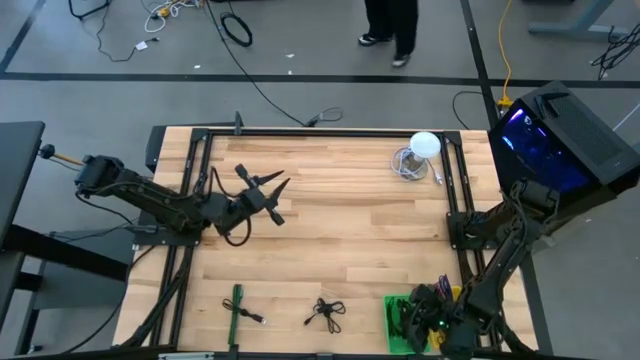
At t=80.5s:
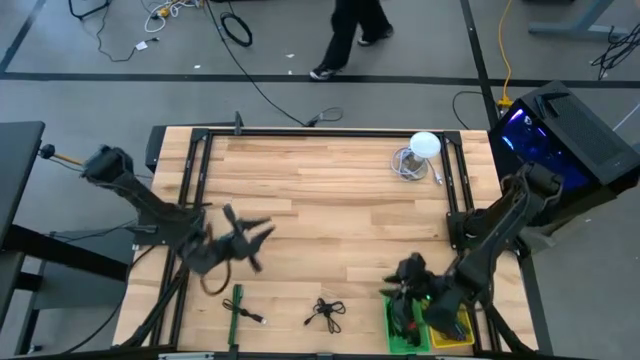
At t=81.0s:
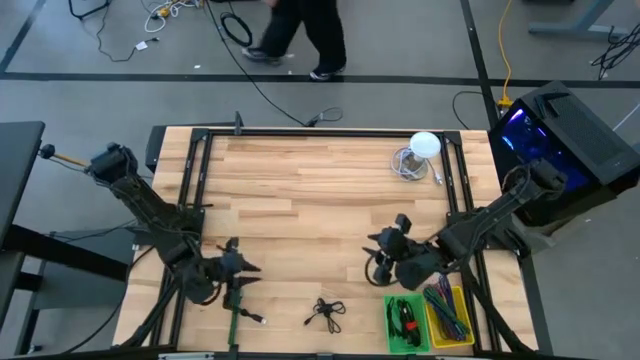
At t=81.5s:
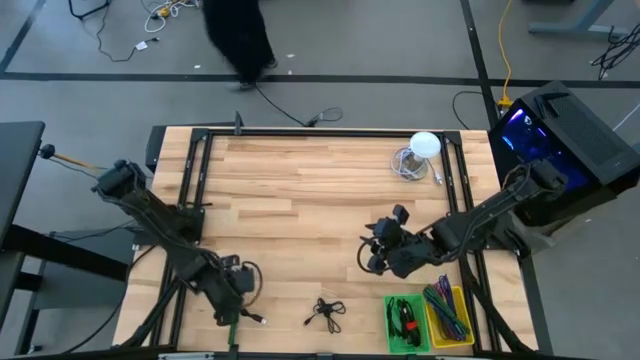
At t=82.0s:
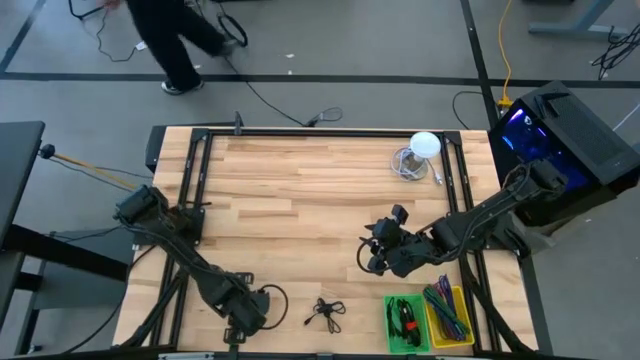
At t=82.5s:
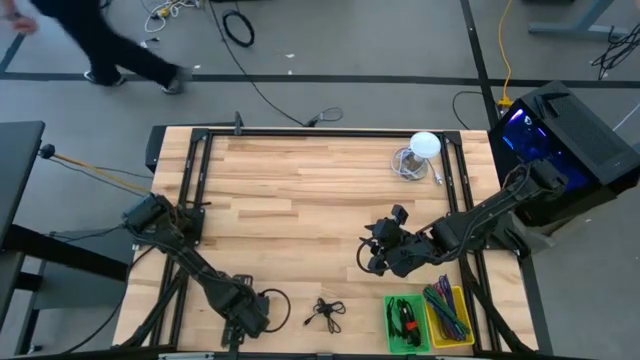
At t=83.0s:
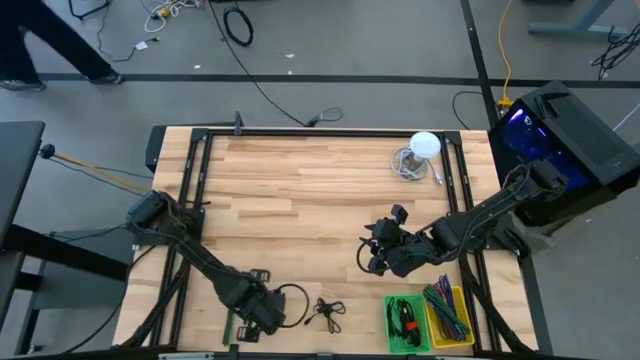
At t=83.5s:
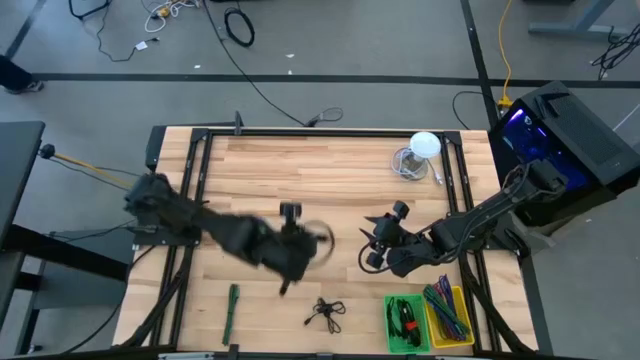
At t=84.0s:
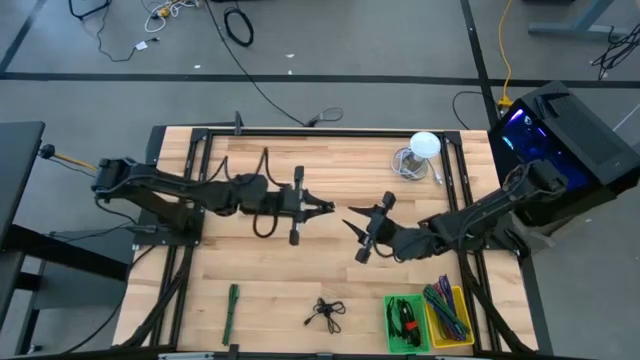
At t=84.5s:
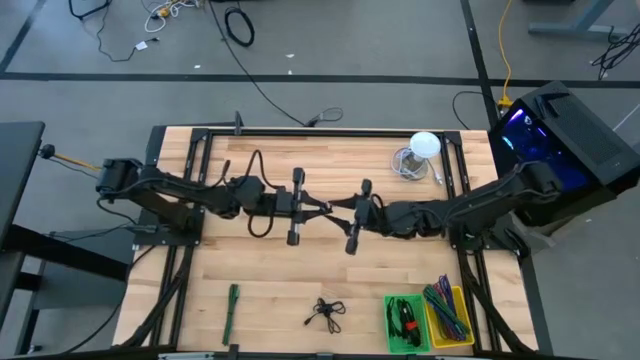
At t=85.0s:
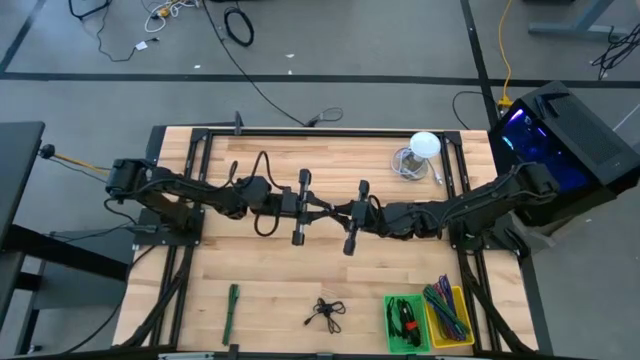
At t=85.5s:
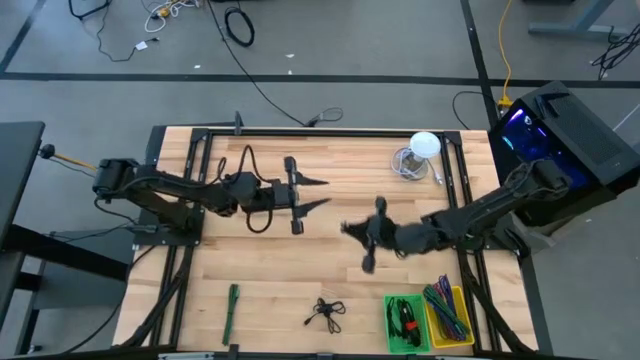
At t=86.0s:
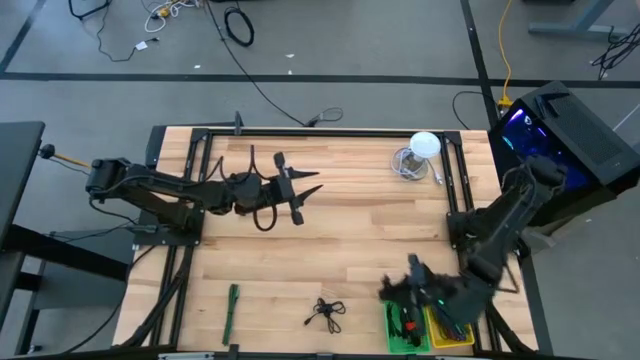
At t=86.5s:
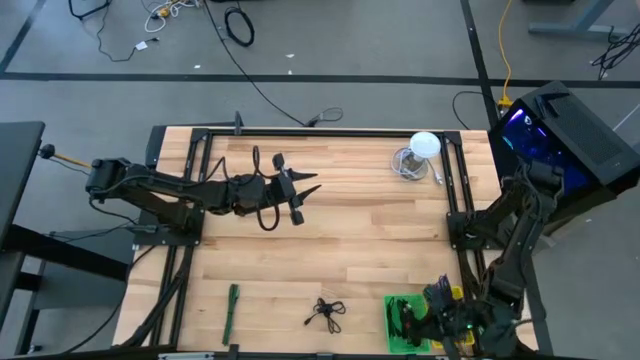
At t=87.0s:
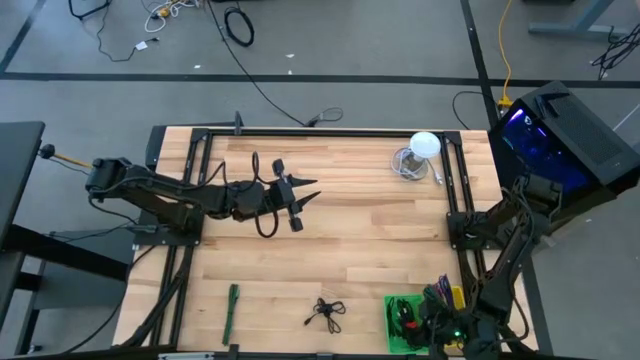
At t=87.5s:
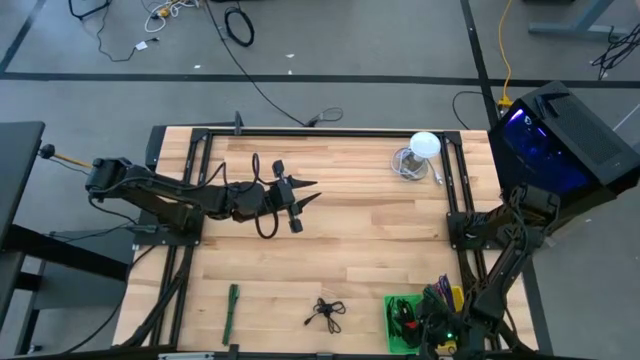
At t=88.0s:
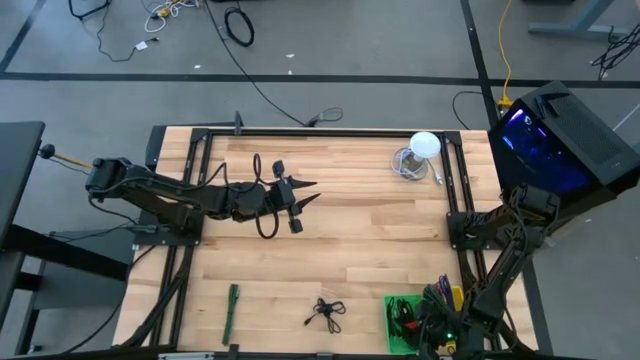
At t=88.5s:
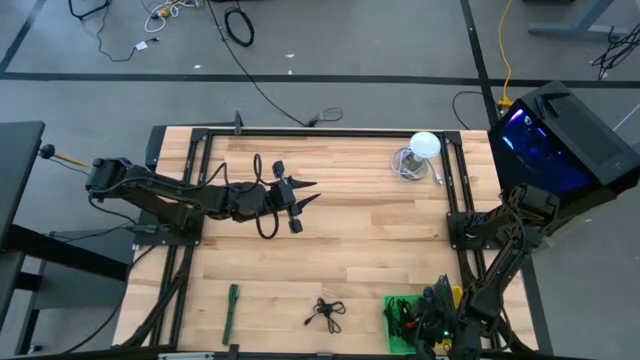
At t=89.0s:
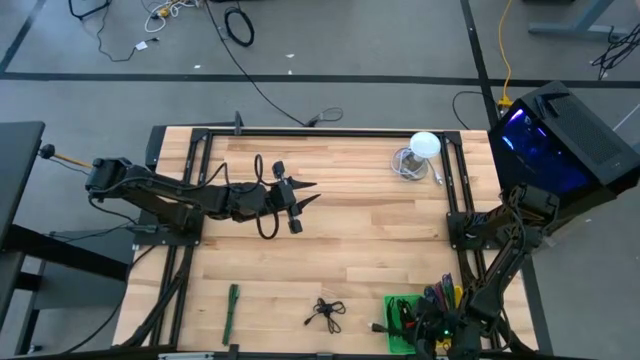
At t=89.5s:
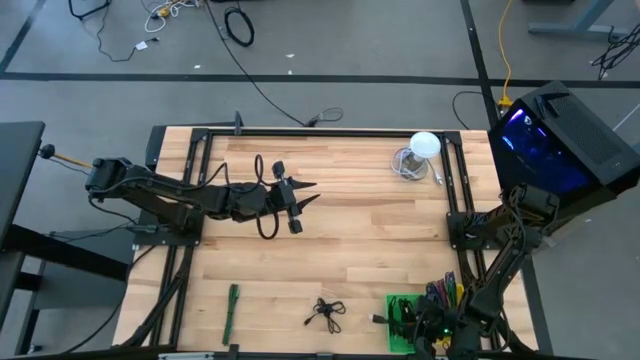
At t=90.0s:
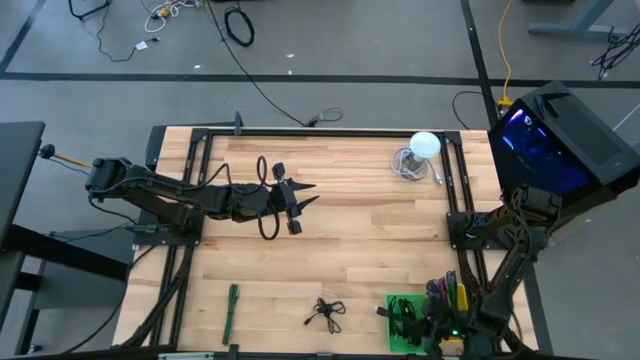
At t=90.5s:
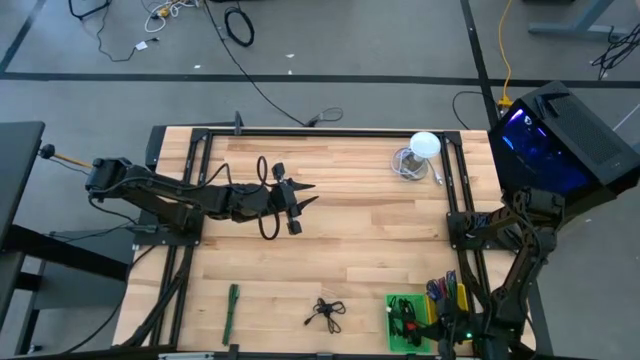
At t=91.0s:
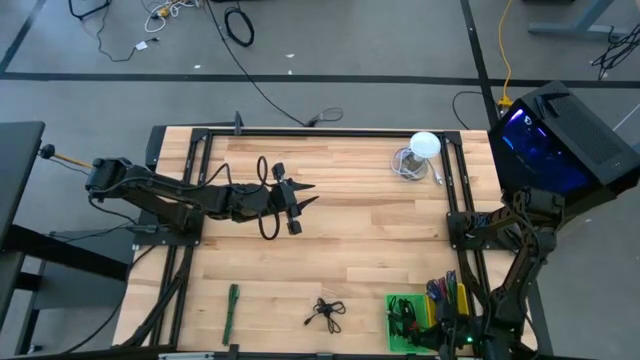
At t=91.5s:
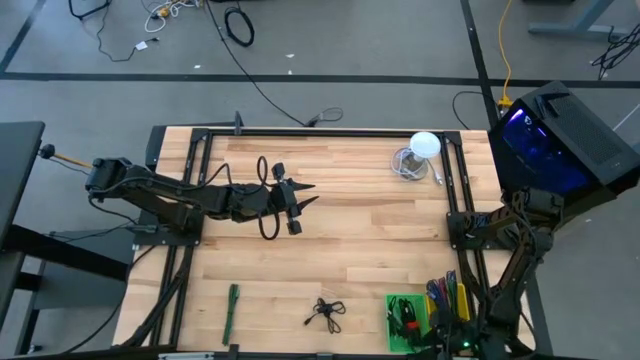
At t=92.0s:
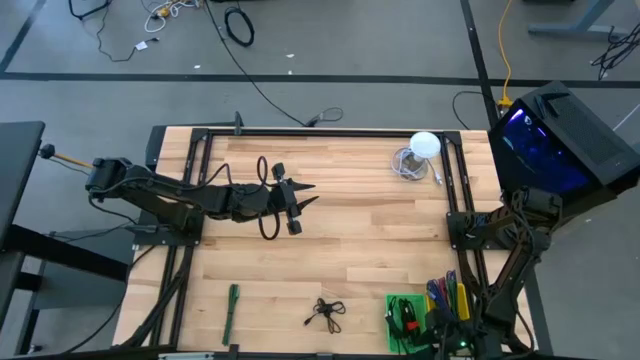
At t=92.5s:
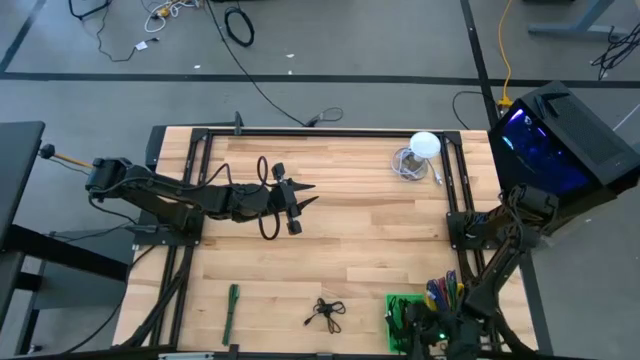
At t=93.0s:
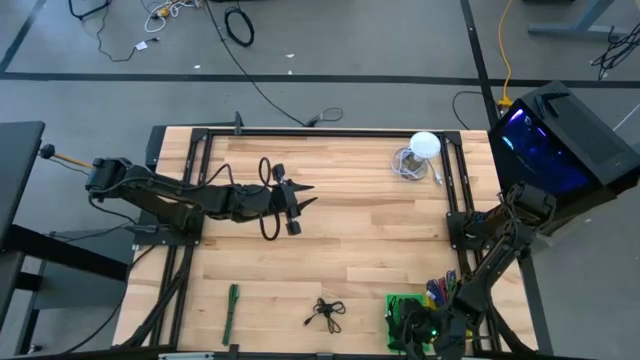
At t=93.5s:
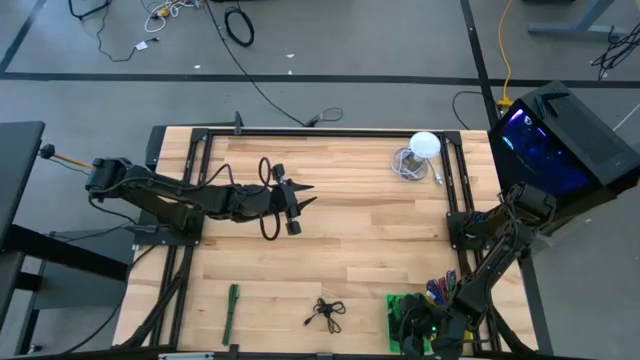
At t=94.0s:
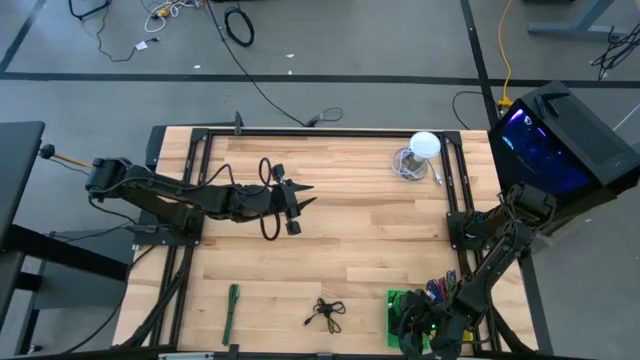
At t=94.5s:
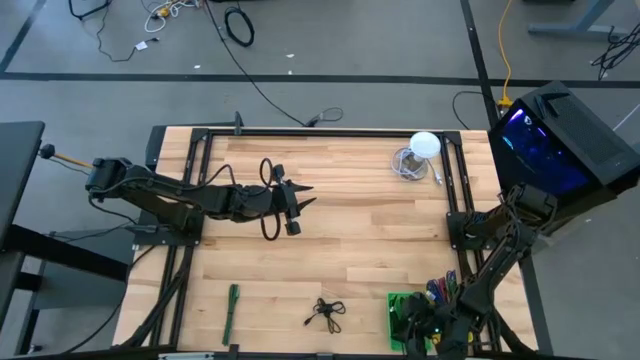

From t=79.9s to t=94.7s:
Task: Pick & Place USB Port
Put the black charger cable into the green basket

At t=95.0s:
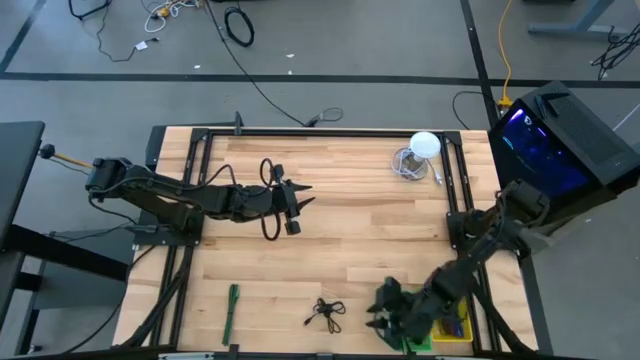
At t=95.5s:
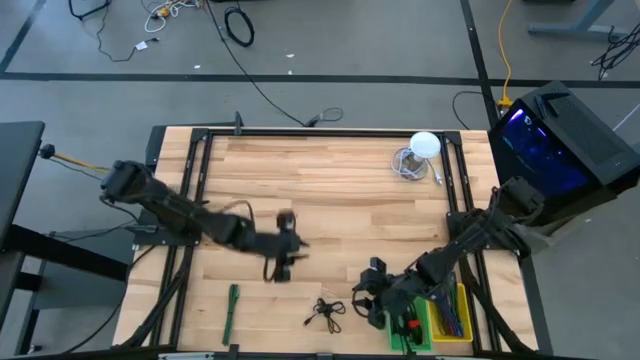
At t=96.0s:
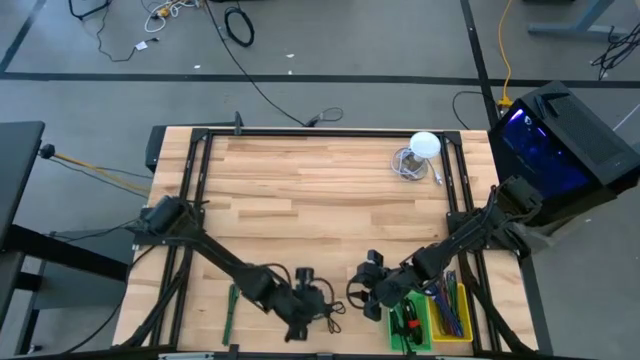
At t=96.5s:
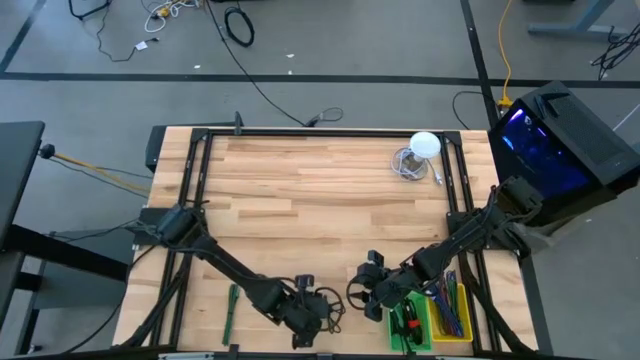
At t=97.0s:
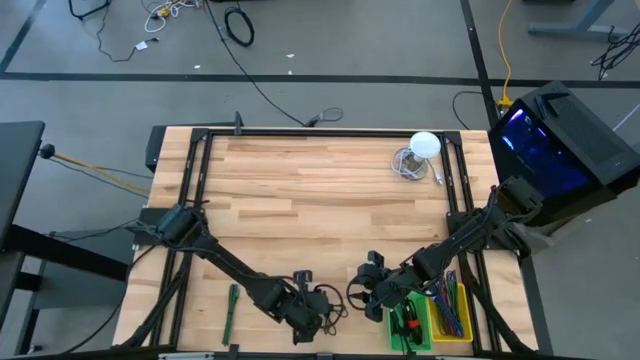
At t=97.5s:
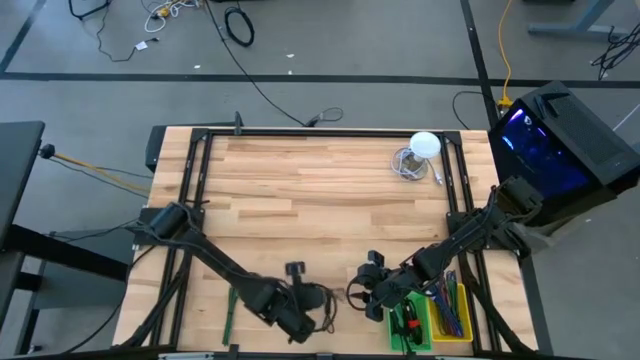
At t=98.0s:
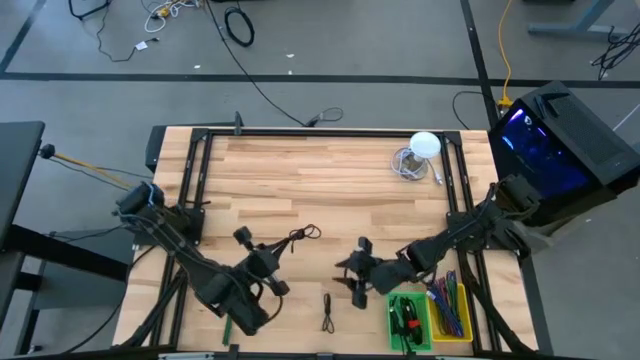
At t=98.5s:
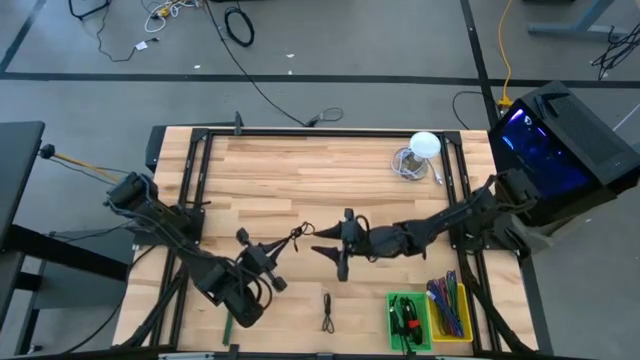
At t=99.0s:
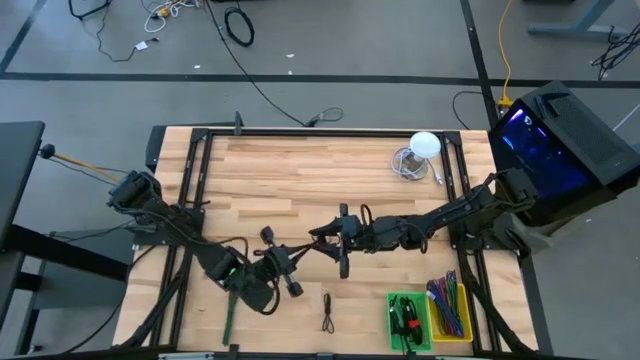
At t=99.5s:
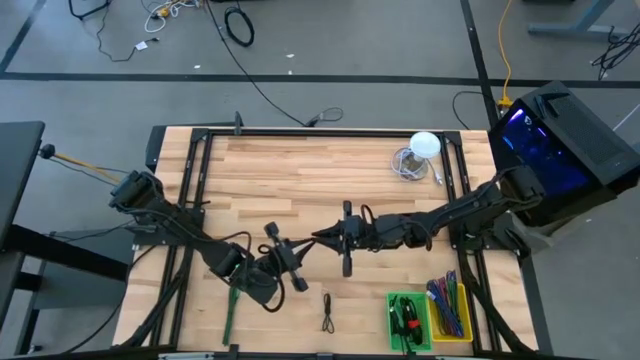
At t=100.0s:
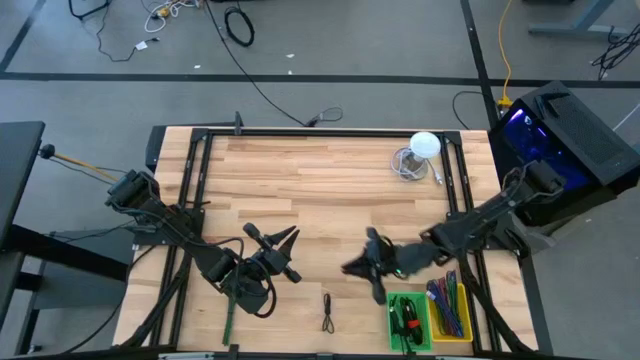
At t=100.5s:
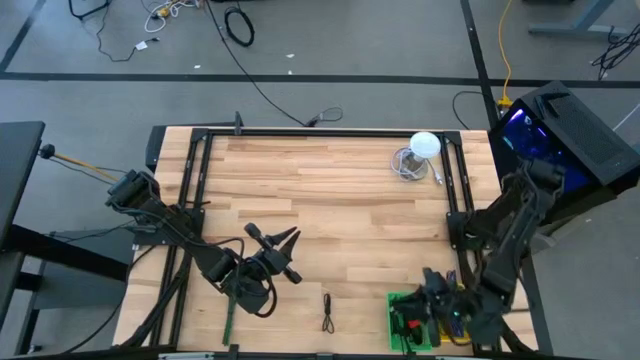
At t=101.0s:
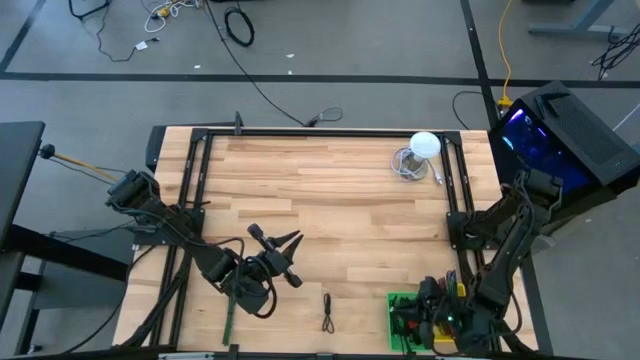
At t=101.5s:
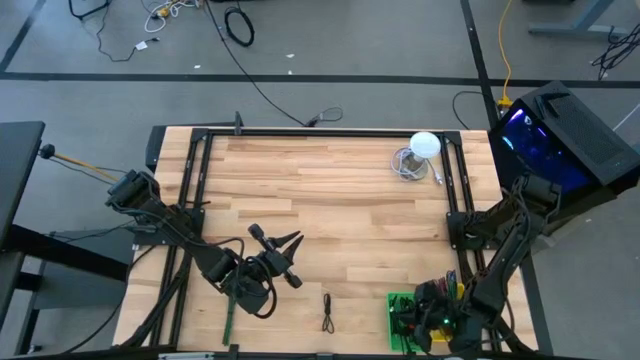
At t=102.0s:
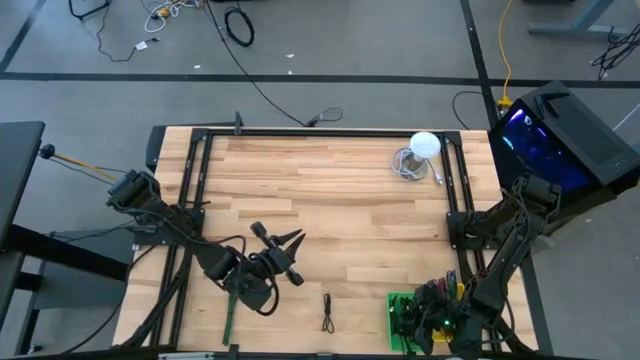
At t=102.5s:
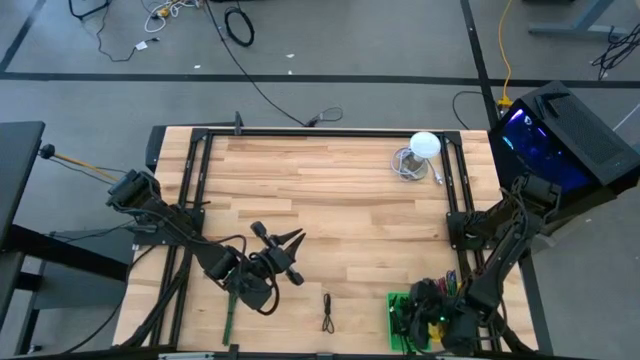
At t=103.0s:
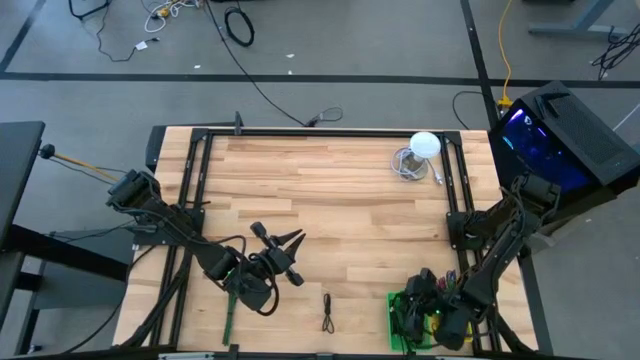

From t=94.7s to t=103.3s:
Put the black charger cable into the green basket
